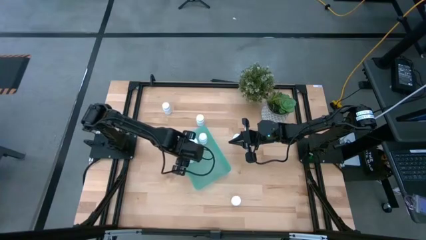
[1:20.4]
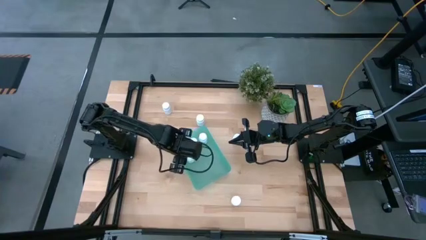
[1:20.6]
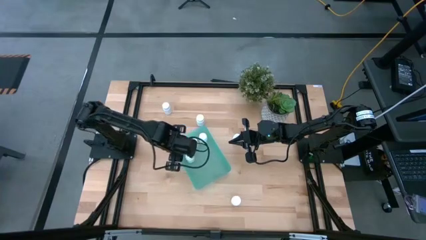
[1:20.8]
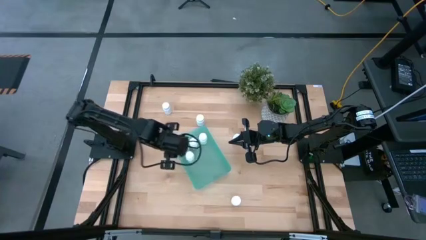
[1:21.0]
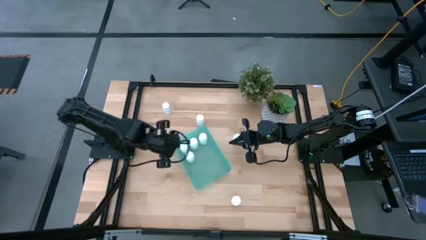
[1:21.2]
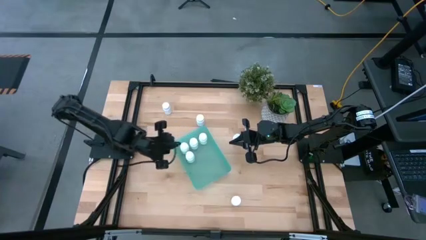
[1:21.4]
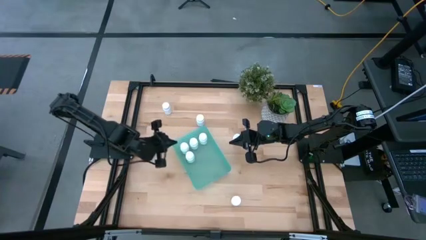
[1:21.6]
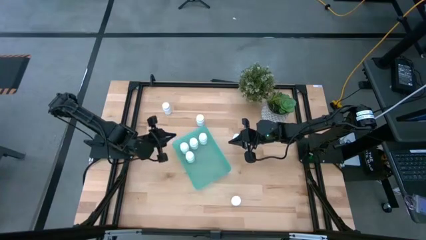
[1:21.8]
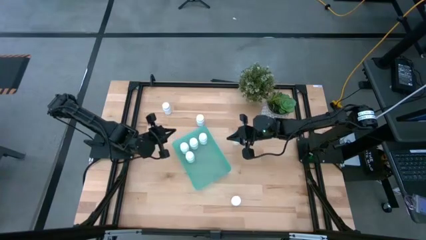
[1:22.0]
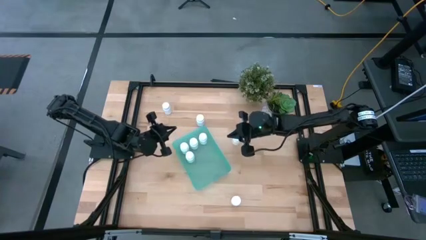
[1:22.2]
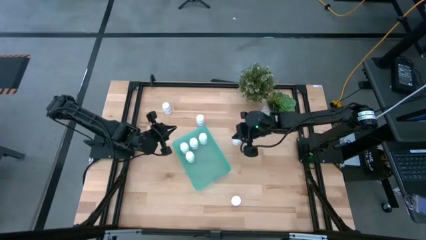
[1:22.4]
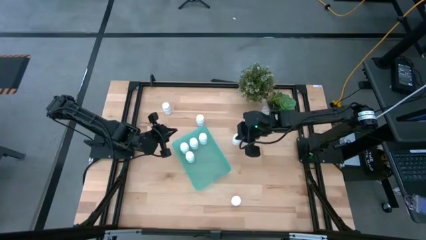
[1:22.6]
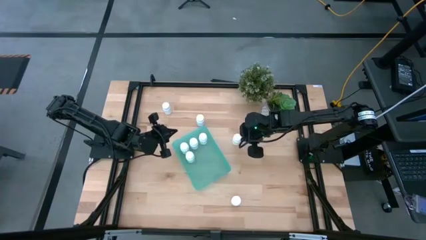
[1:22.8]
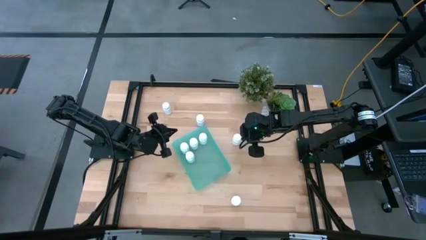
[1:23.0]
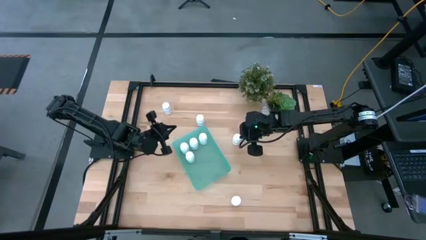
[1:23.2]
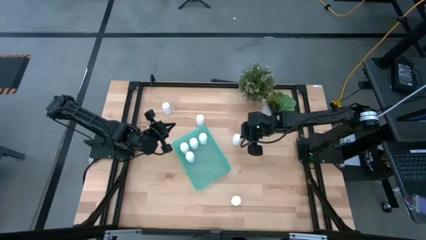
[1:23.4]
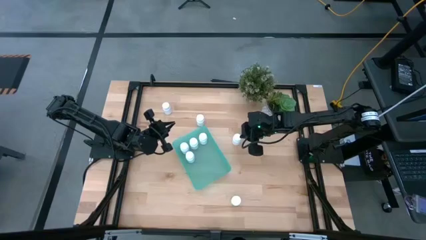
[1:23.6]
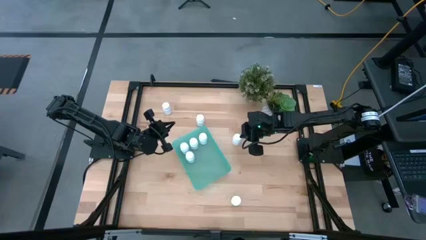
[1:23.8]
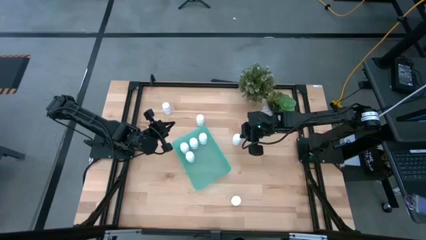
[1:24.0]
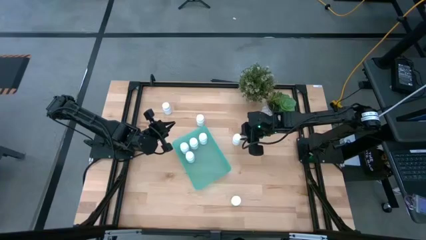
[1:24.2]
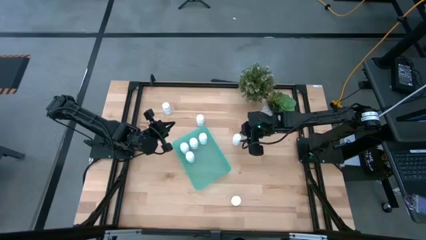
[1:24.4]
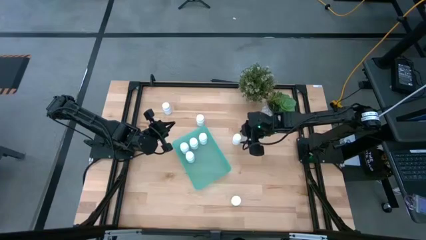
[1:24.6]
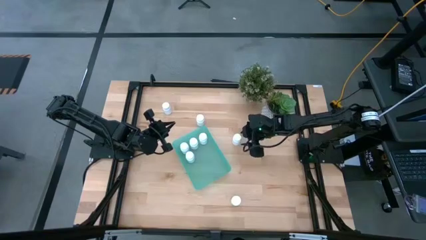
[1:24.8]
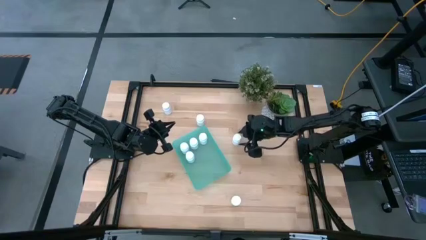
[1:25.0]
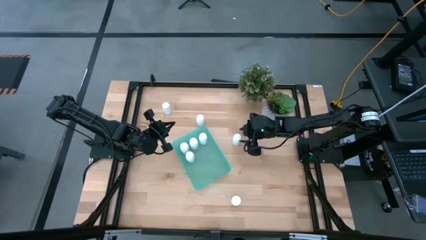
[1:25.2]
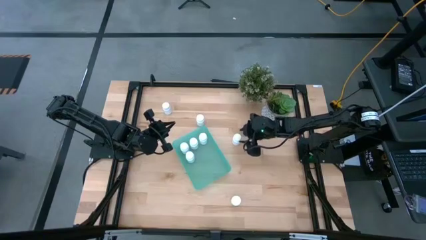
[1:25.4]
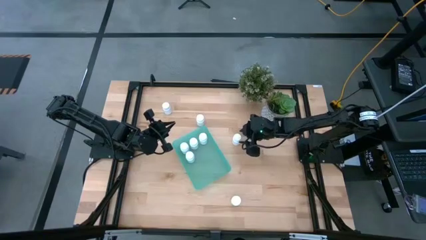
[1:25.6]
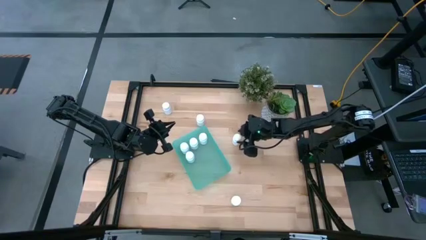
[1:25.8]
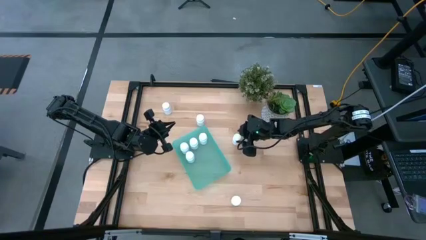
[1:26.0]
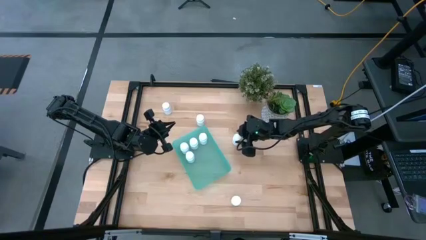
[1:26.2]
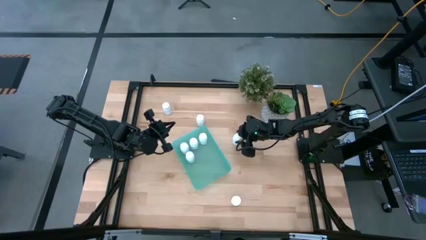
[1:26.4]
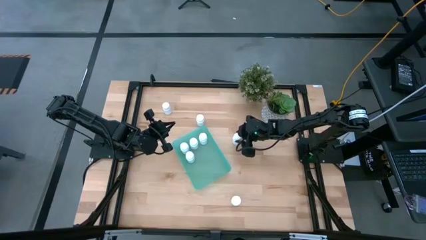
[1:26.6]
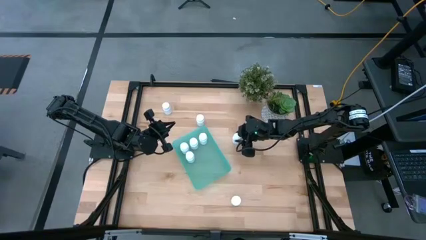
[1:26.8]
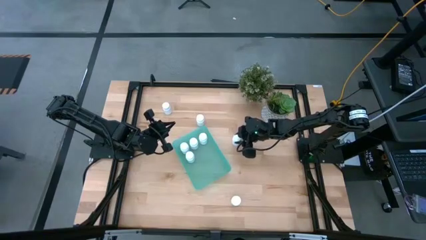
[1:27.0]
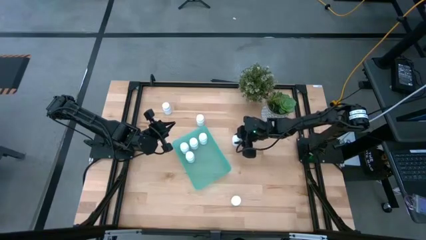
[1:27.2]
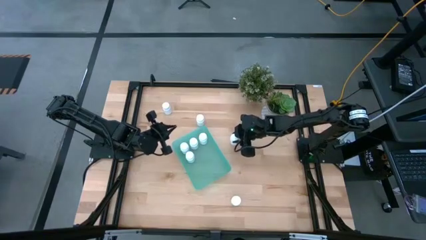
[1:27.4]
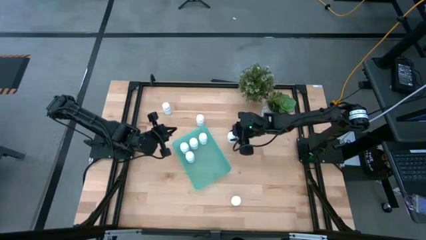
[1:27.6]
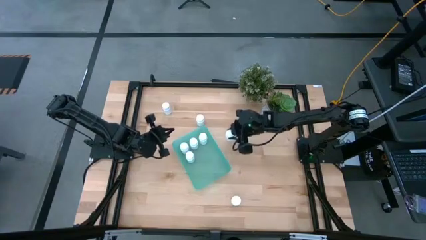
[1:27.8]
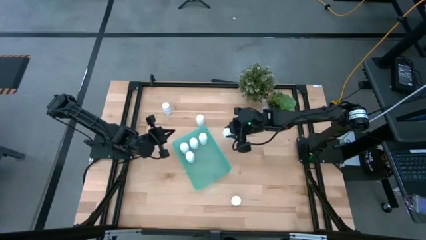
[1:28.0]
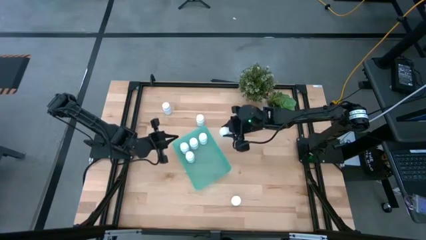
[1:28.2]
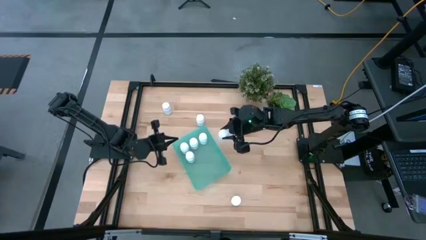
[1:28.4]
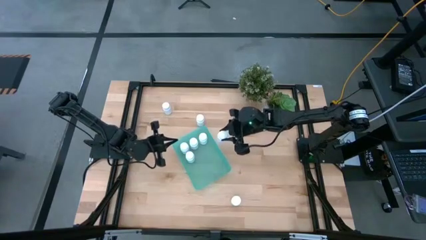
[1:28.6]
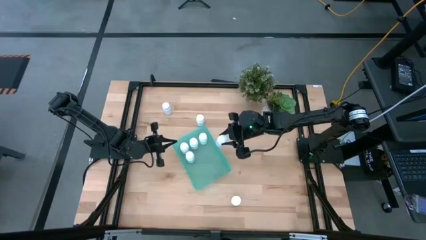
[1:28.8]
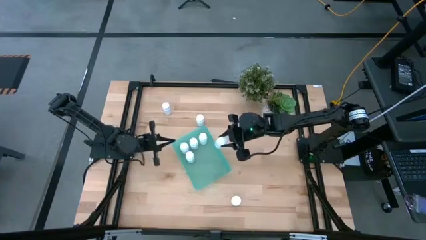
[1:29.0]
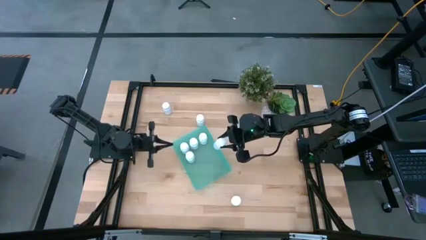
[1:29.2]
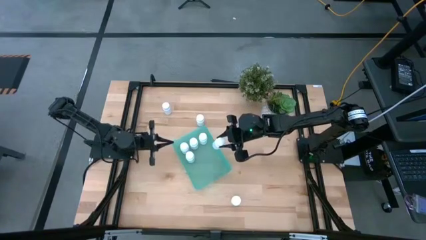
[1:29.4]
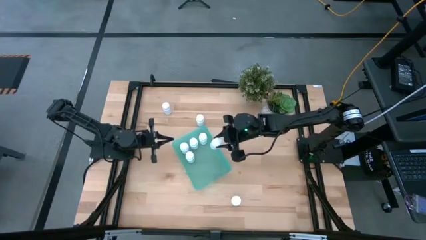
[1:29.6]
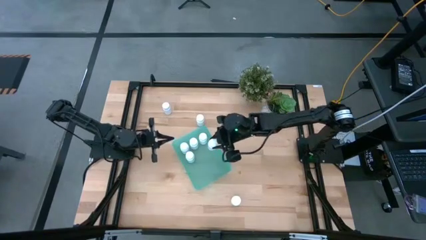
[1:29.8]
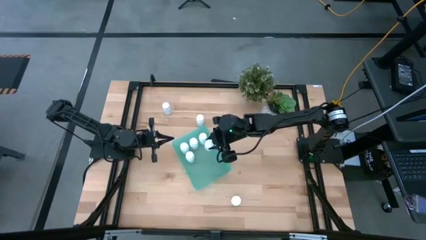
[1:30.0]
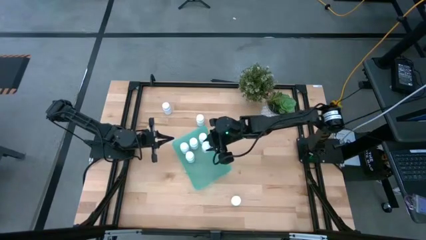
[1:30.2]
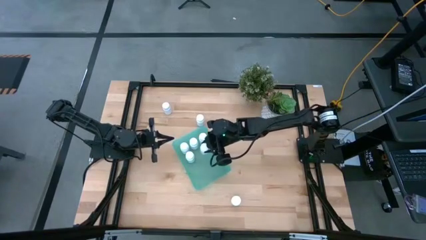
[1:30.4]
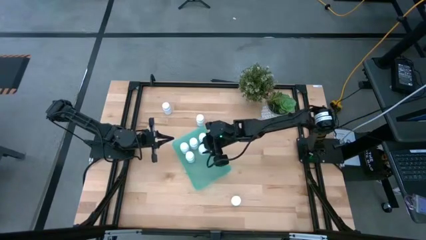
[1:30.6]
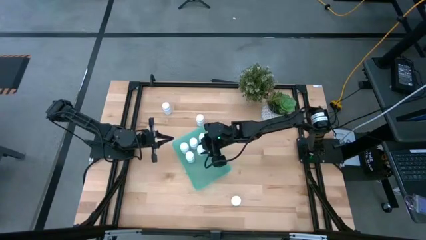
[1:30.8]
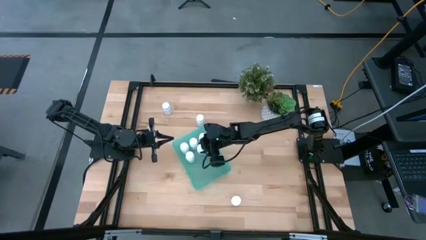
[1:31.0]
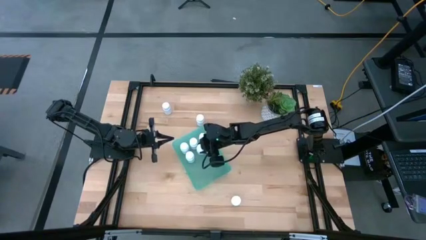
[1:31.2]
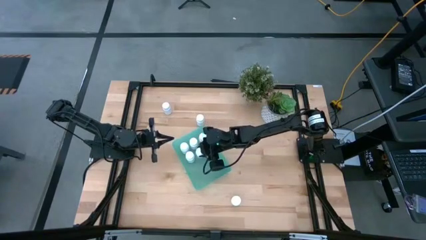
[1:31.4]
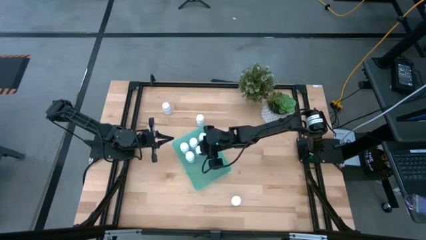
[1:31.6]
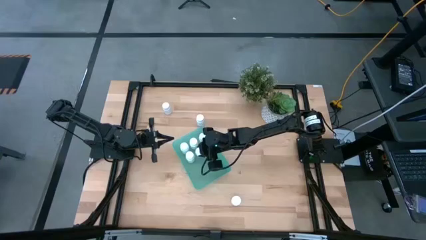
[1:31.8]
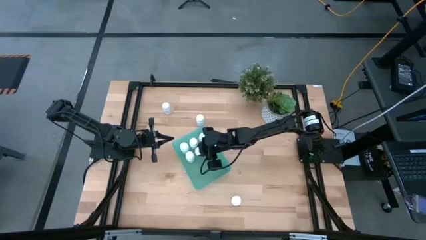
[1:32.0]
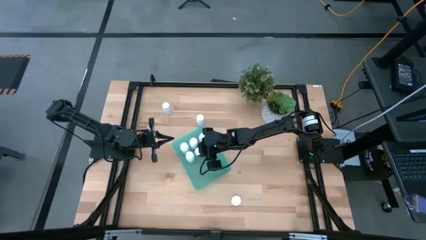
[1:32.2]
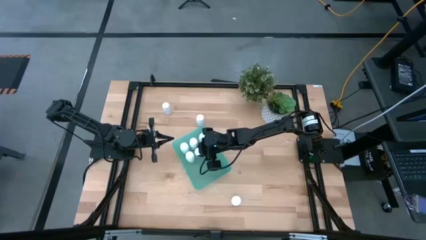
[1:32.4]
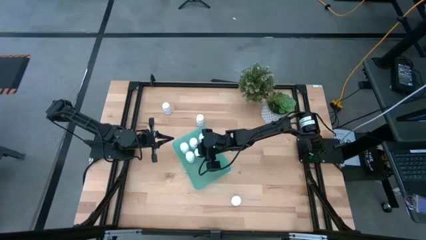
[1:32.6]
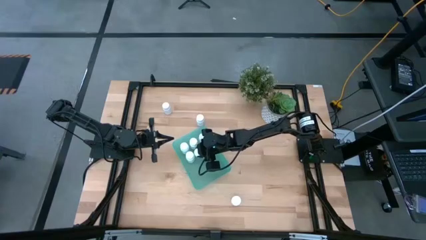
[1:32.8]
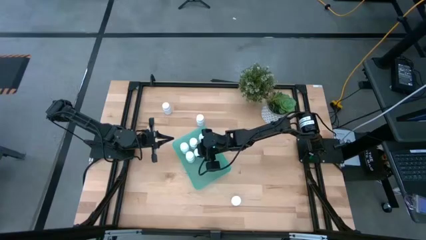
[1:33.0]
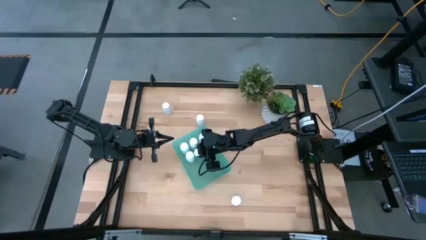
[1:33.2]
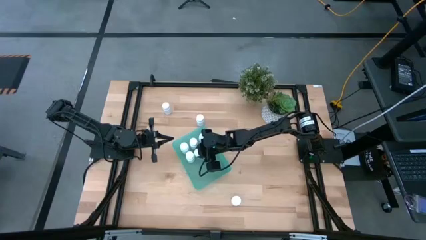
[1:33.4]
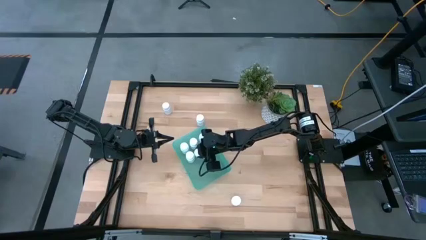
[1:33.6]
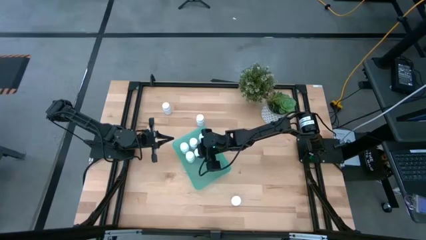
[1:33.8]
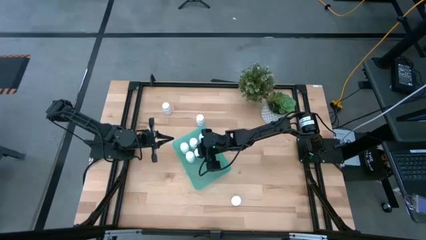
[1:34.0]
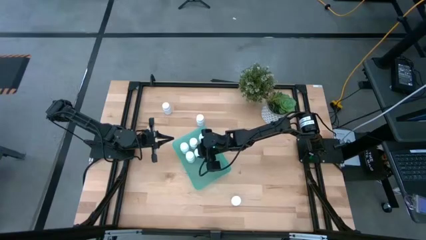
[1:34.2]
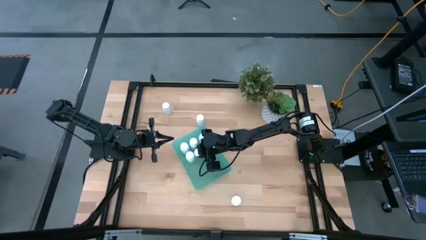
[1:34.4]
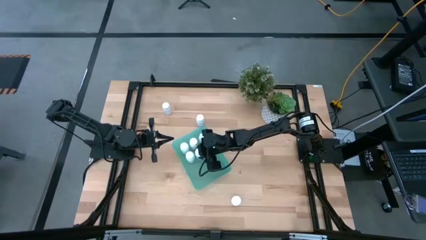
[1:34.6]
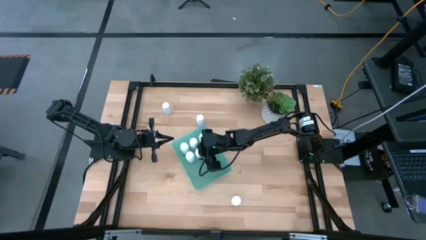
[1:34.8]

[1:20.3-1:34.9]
Task: Pick and place pill bottles into a basket
Put the white medicine bottle into the green bin

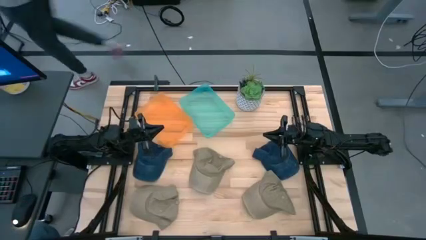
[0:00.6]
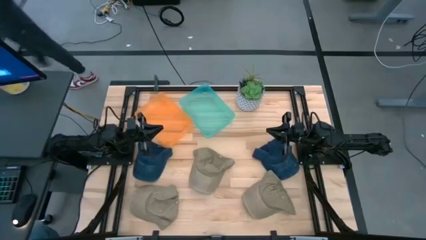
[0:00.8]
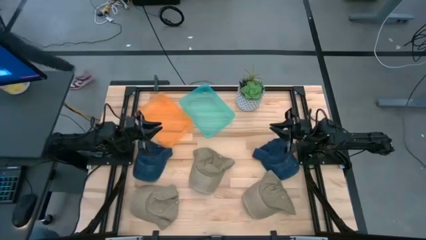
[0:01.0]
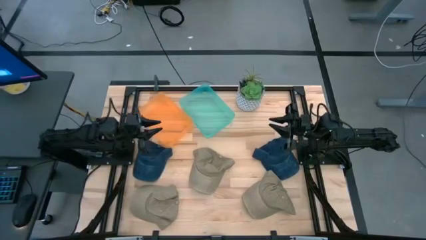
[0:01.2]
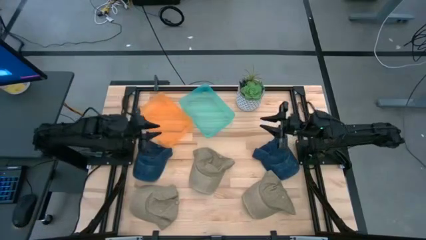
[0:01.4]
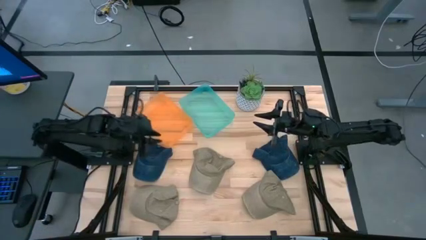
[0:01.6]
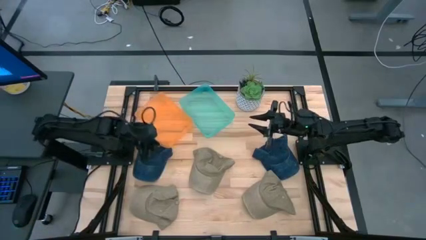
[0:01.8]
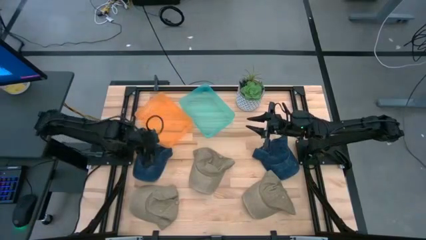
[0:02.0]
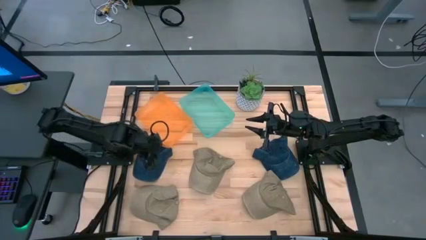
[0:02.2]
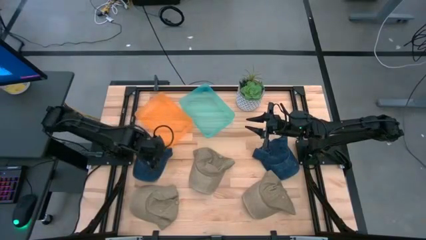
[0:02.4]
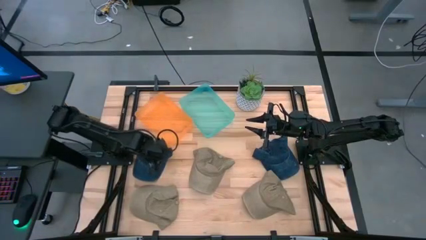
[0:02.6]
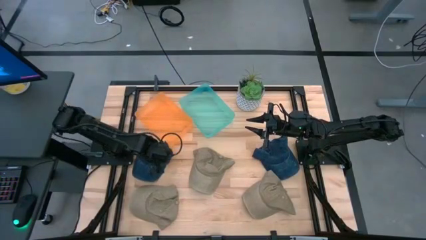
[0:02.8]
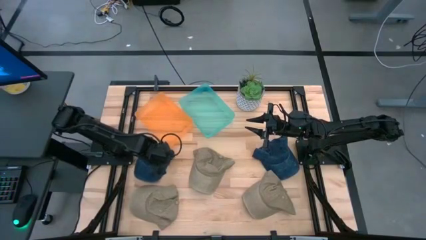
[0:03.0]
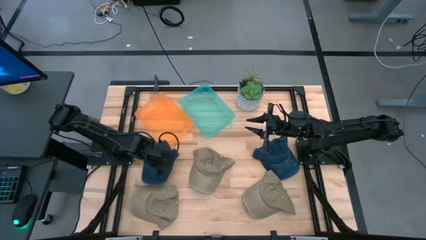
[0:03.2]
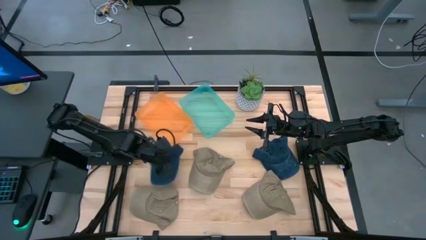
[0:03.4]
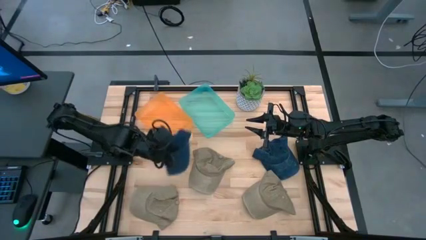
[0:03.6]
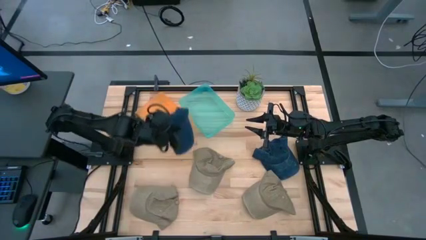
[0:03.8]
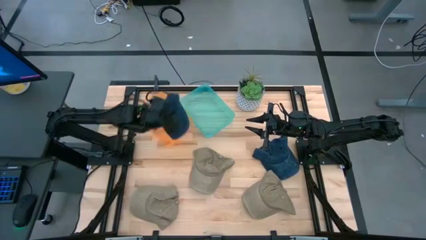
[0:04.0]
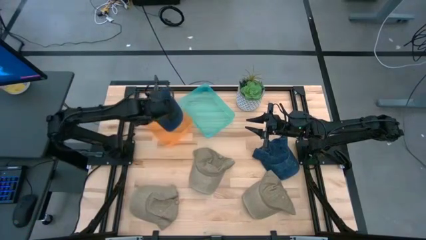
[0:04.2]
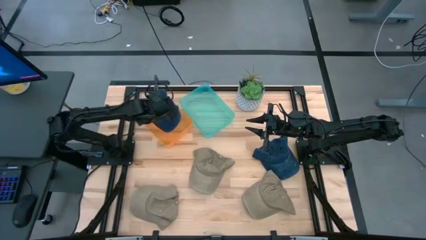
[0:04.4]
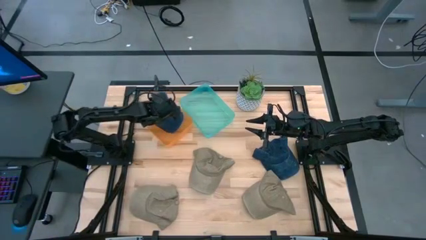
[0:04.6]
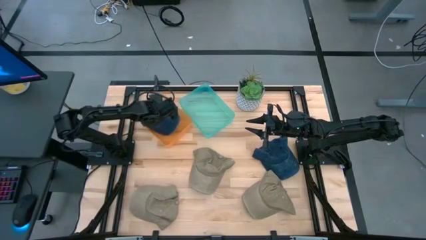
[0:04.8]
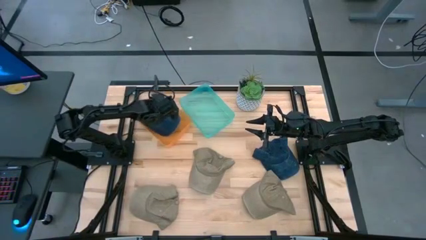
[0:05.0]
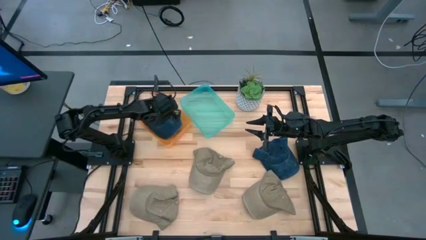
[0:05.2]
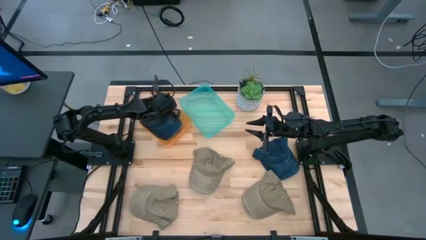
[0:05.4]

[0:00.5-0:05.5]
Task: Pick & Place hat
Put the left blue cap into the orange bin
